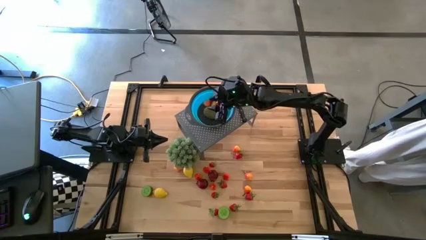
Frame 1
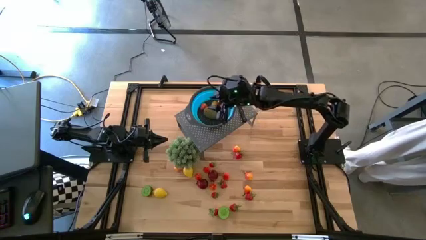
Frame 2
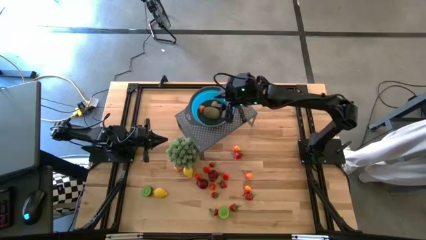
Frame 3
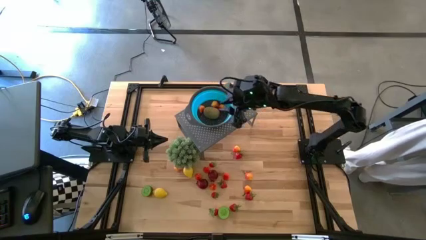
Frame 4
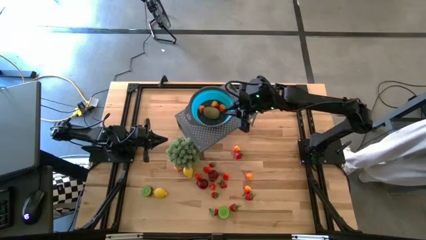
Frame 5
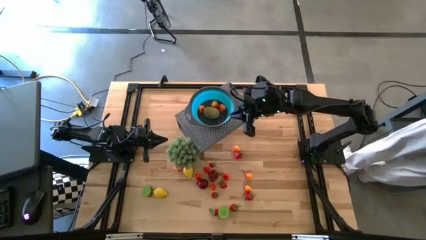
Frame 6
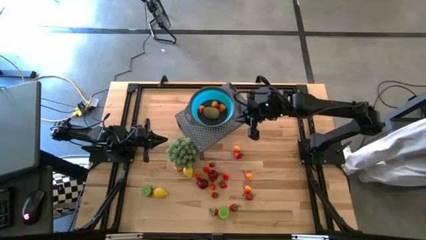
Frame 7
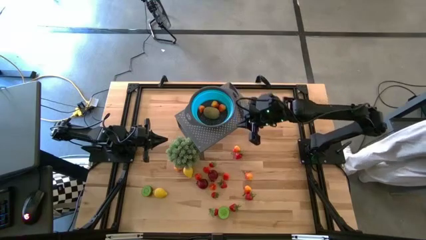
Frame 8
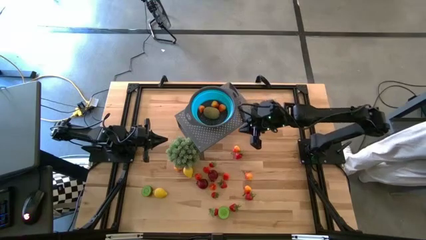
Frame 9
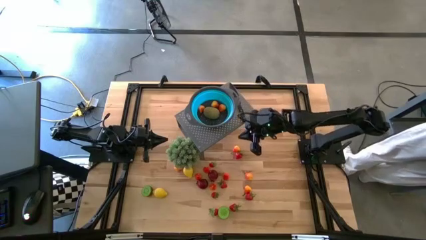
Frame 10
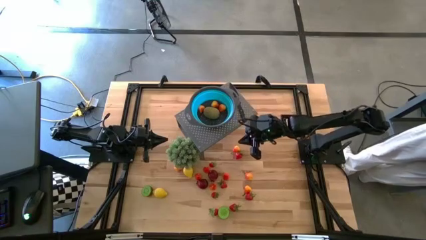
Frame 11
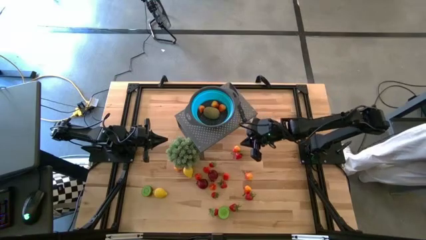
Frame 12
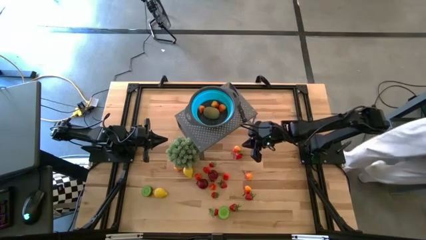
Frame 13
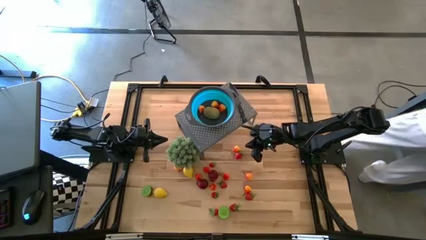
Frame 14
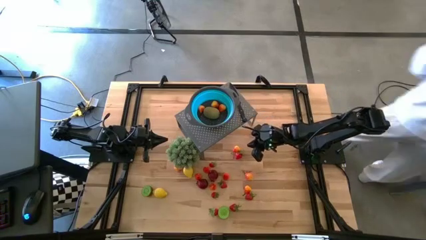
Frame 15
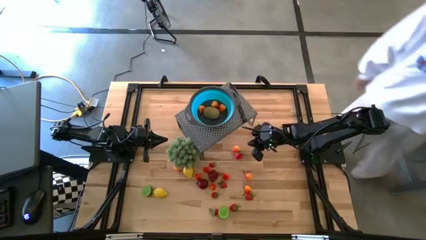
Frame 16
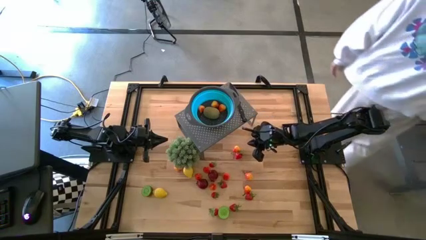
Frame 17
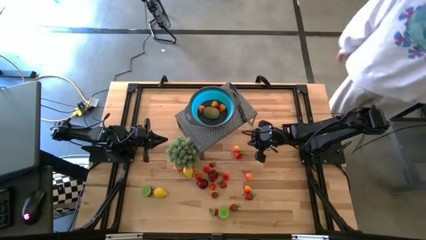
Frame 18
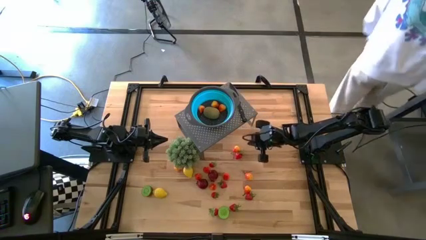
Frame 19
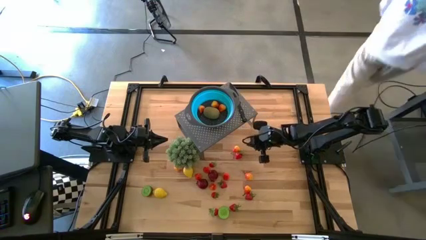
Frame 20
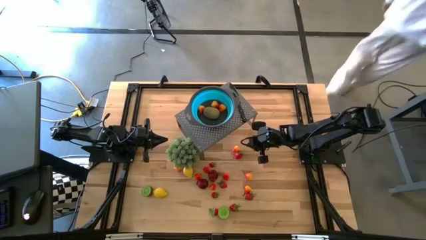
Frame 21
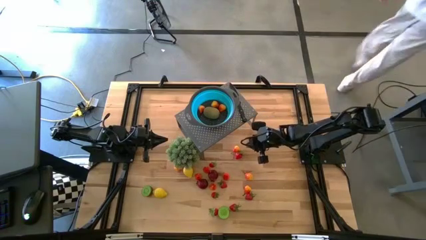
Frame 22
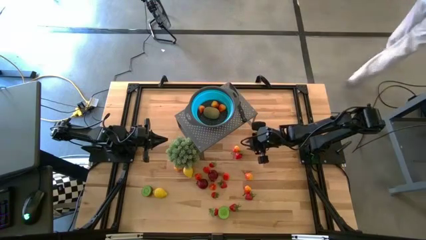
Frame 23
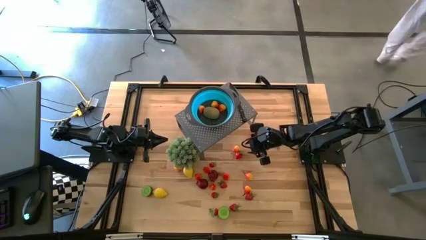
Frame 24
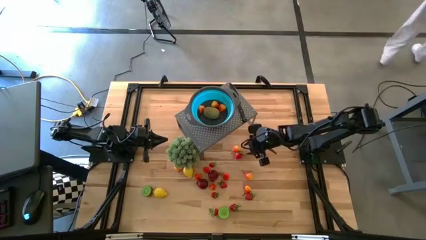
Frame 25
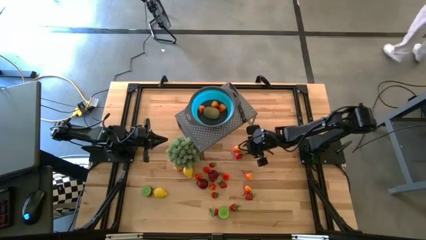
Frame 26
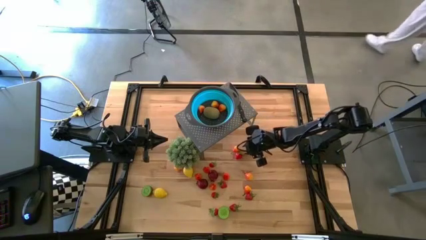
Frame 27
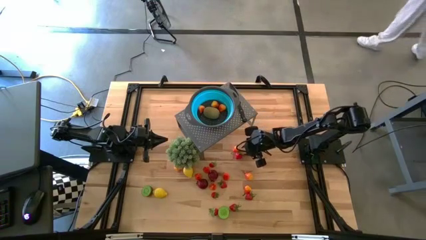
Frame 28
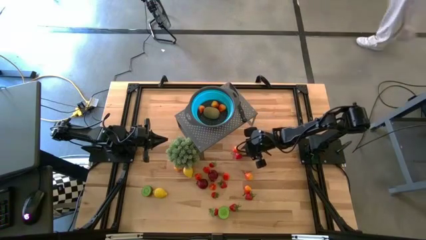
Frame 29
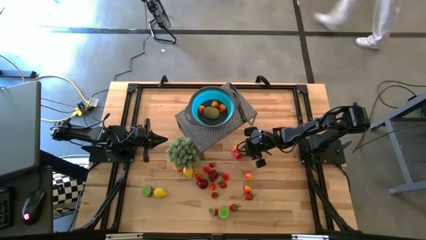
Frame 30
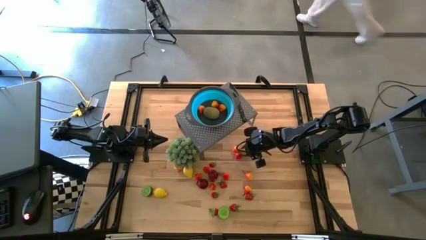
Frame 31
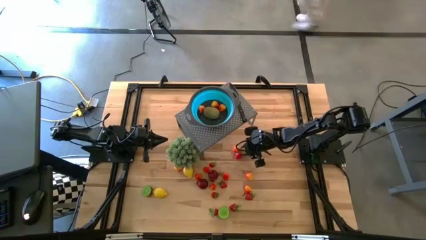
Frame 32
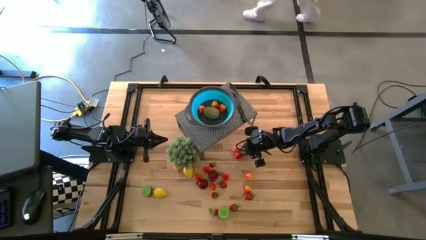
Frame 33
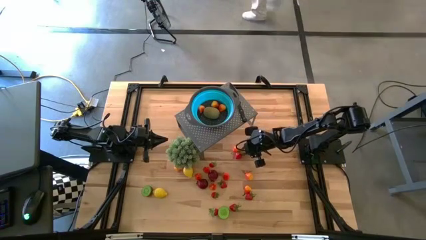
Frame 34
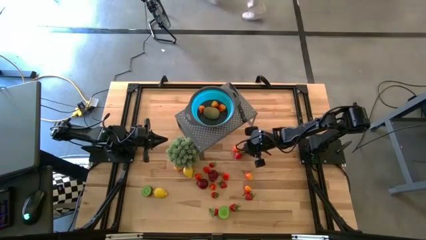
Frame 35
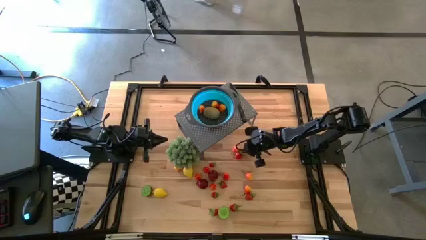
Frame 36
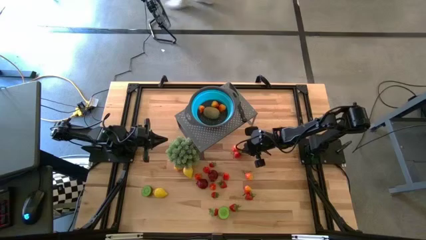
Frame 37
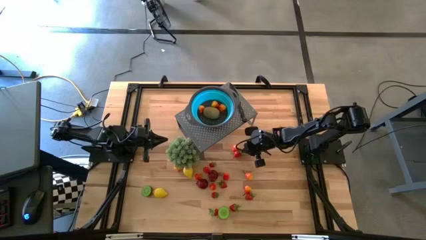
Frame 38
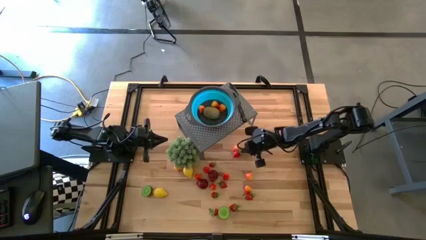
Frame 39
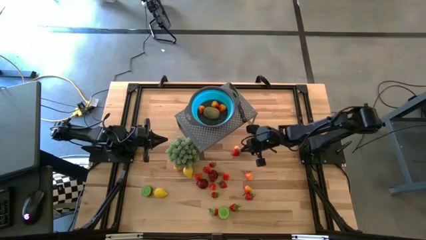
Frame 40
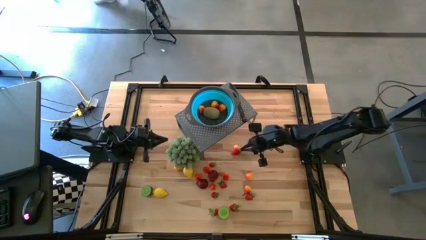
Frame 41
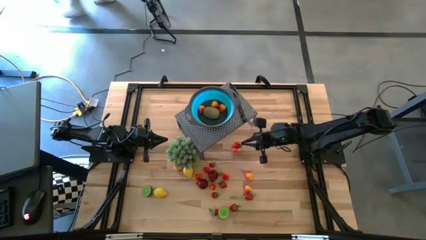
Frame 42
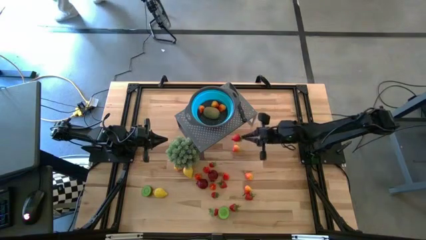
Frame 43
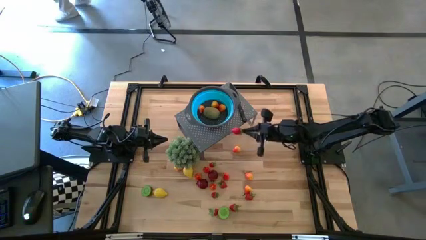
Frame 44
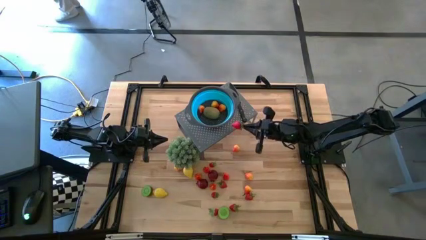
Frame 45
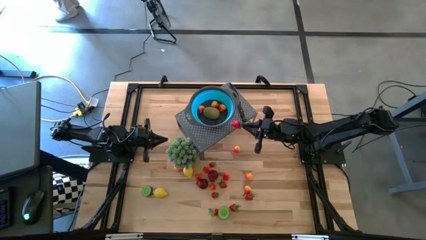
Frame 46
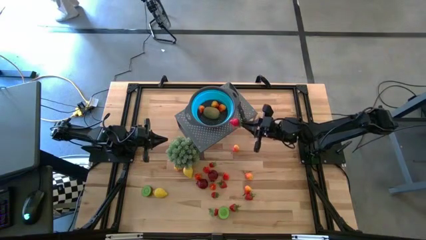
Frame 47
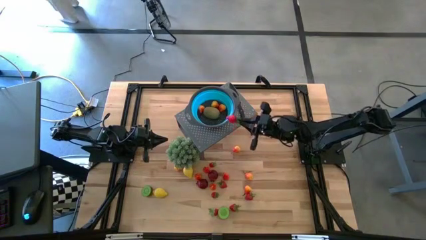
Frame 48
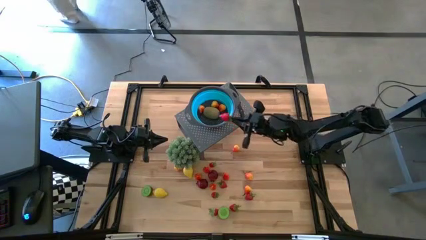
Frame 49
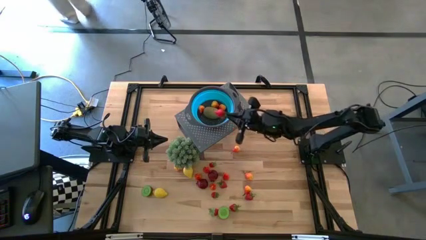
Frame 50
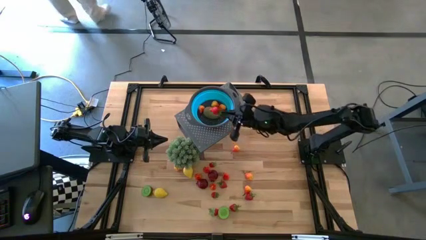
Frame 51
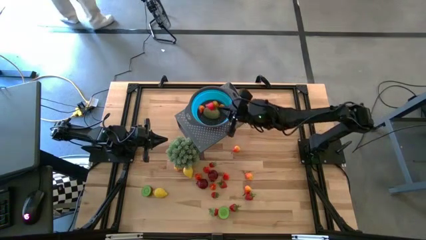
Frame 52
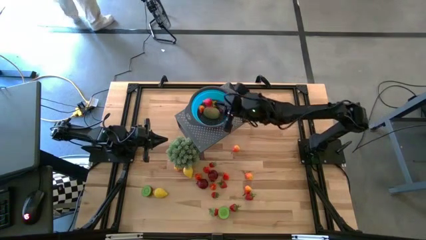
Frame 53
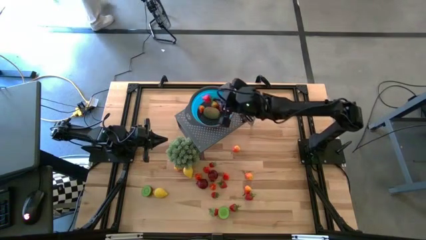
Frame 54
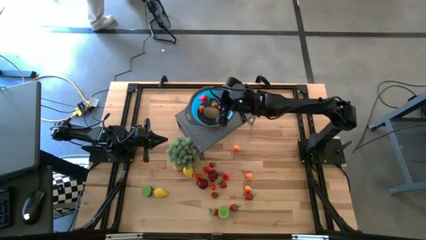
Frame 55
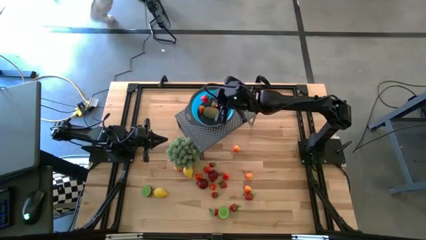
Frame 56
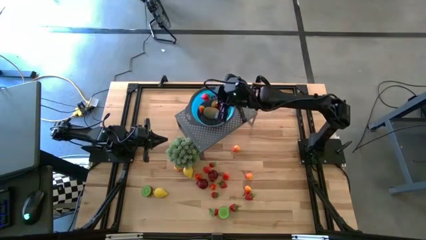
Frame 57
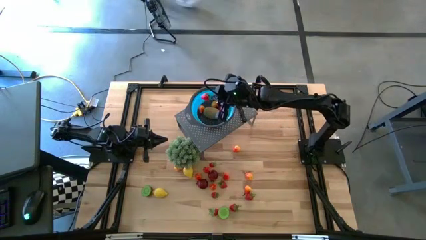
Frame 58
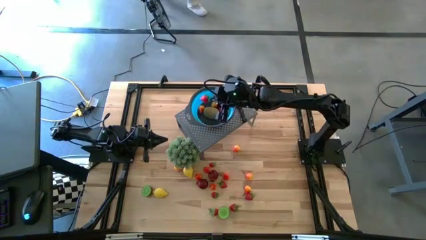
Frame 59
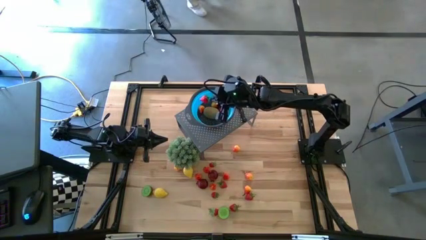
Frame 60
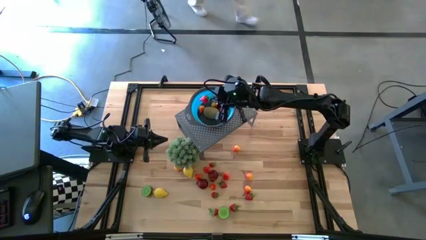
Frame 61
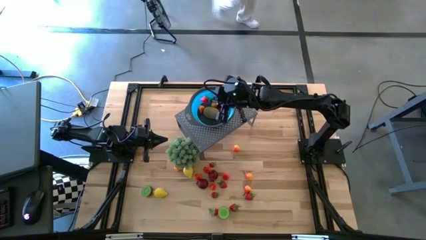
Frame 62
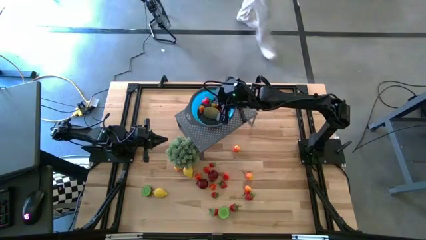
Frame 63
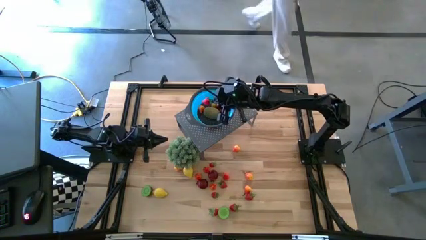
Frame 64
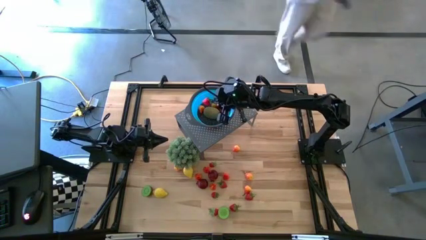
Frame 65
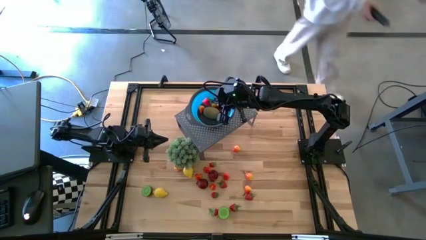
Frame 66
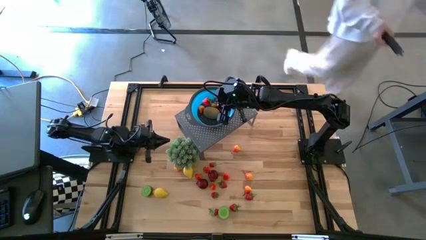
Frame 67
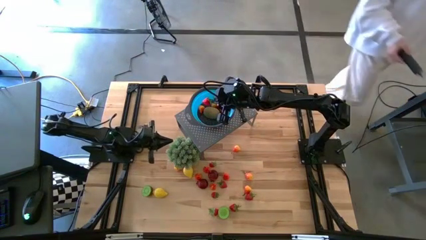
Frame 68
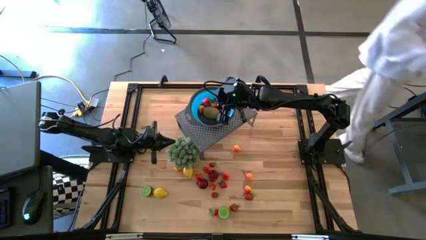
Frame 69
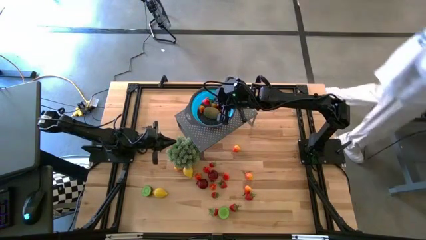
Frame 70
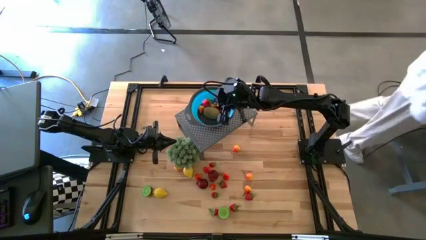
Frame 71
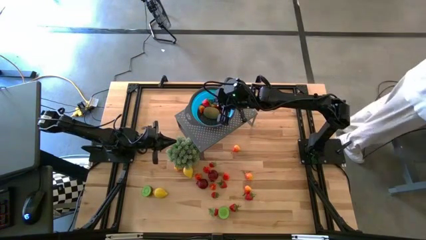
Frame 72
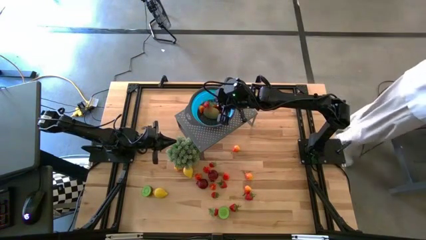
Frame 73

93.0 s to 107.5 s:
Task: Pick & Place Fruit
Put the strawberry into the blue strainer bowl on the shelf
